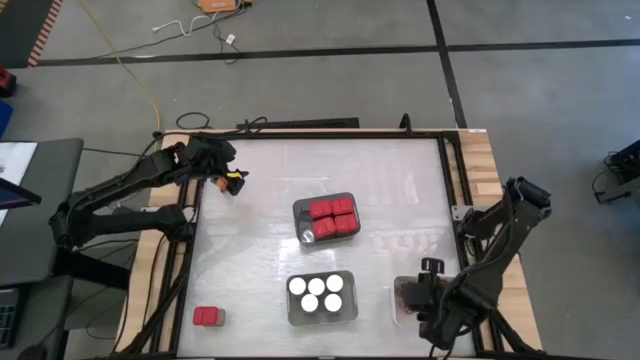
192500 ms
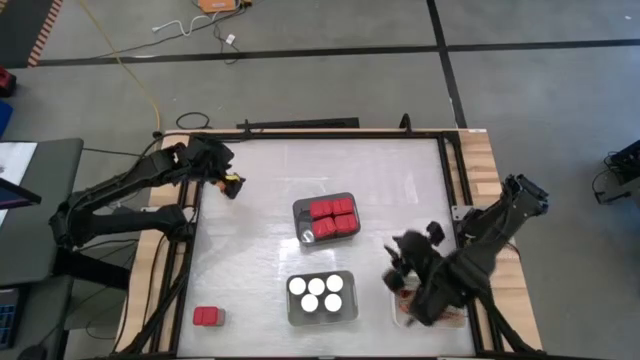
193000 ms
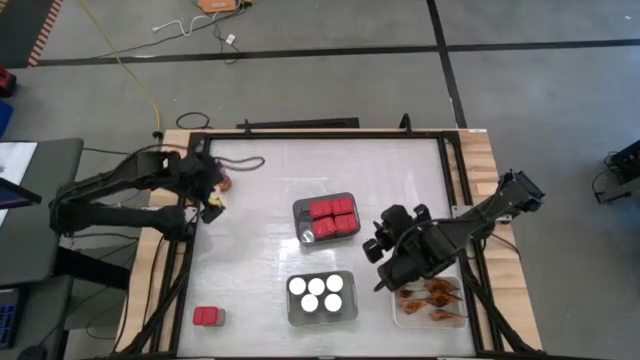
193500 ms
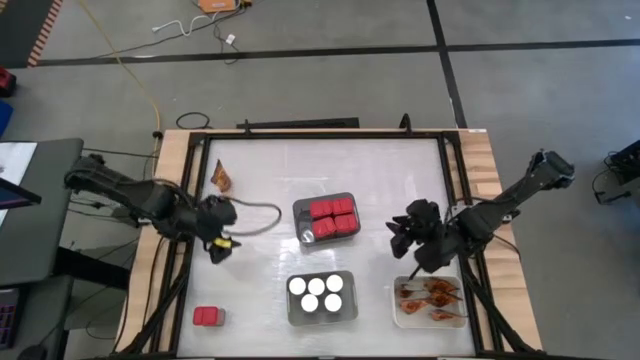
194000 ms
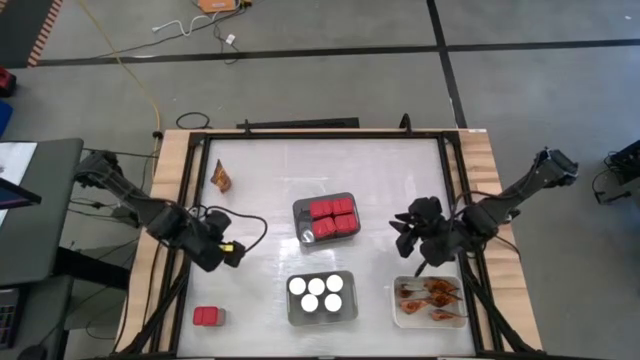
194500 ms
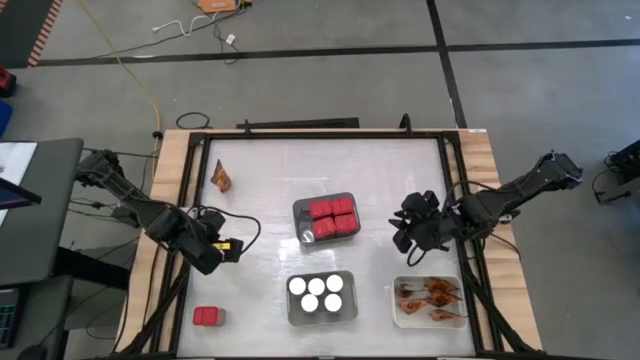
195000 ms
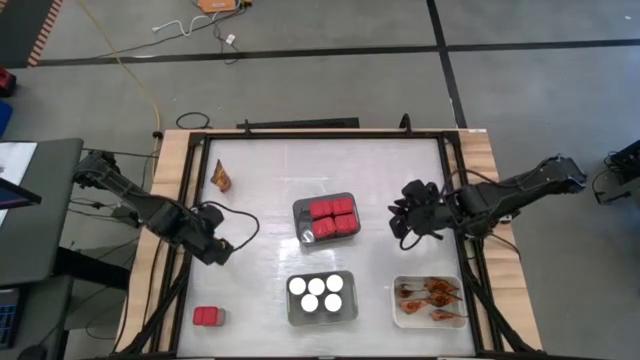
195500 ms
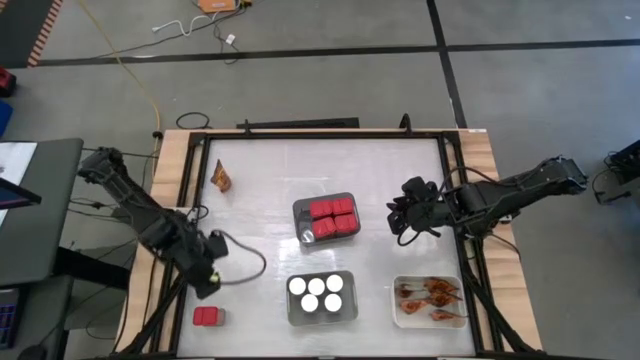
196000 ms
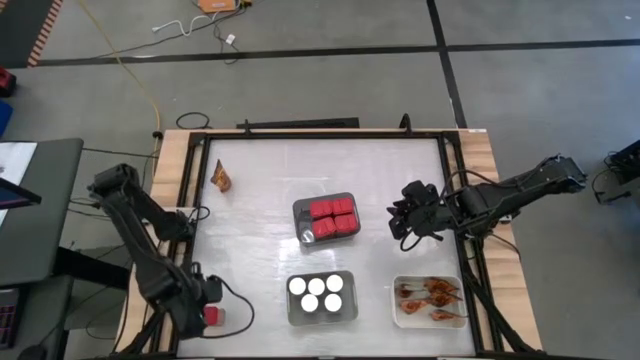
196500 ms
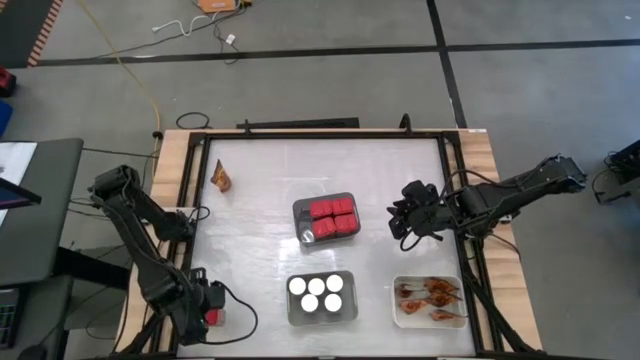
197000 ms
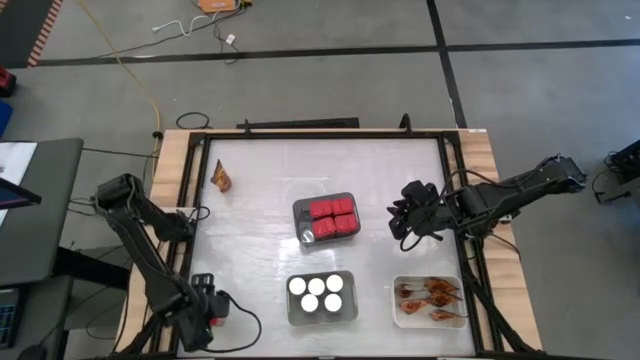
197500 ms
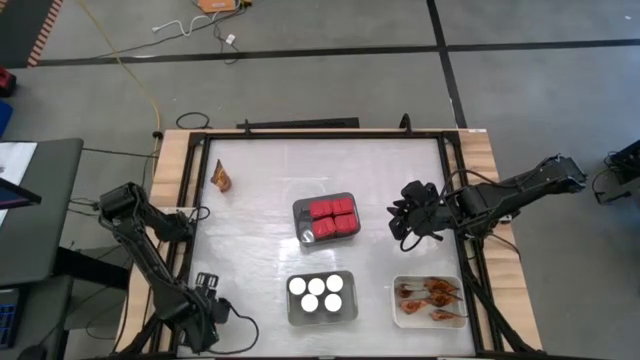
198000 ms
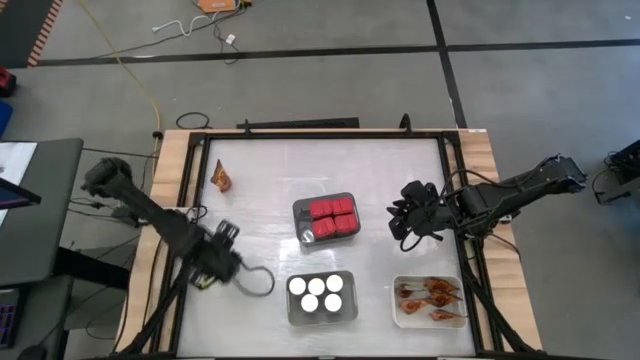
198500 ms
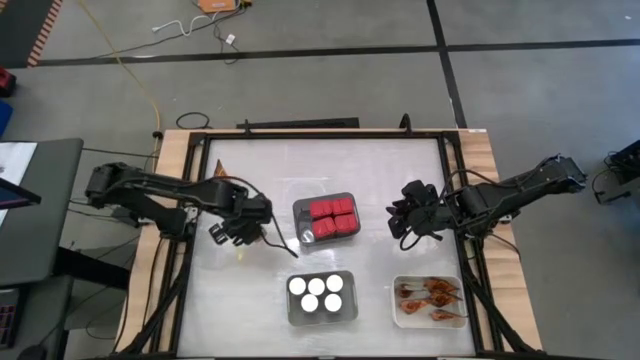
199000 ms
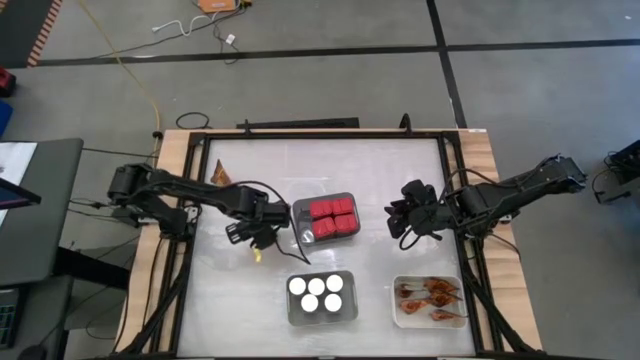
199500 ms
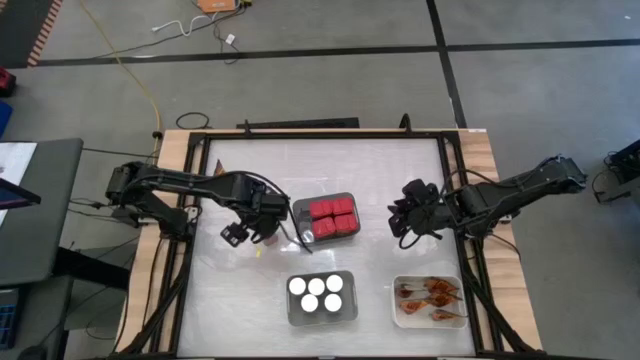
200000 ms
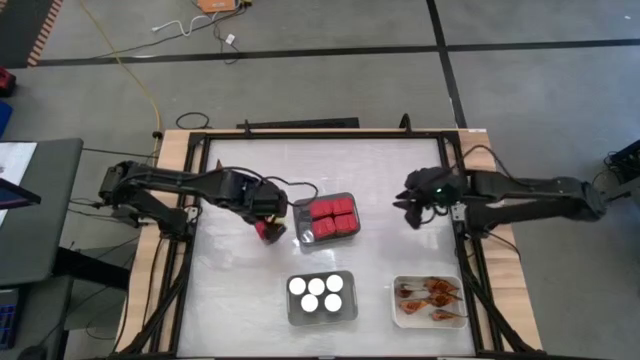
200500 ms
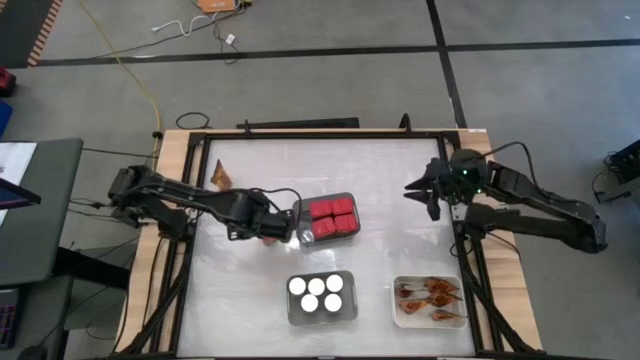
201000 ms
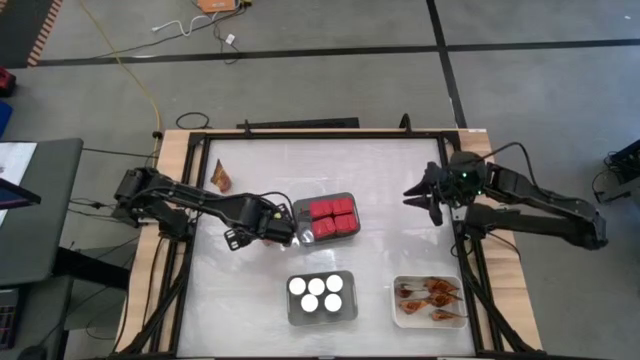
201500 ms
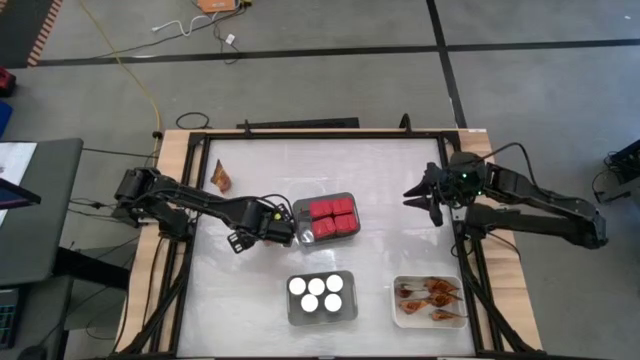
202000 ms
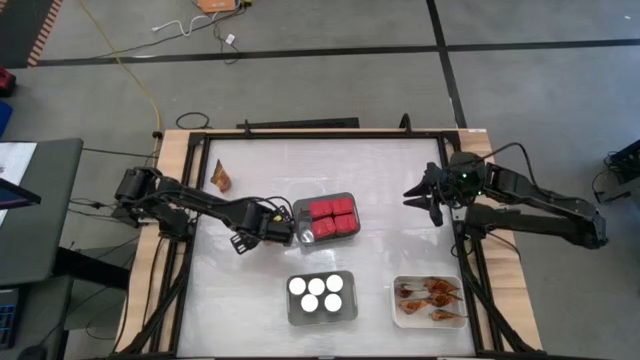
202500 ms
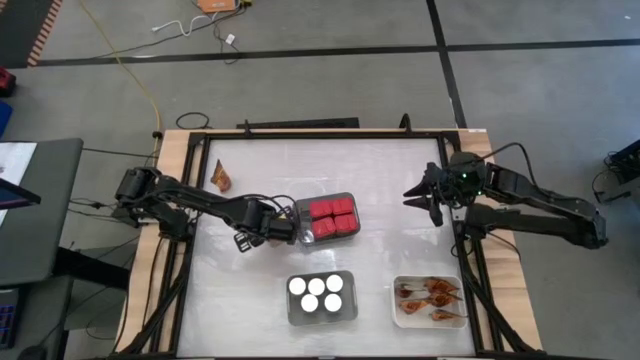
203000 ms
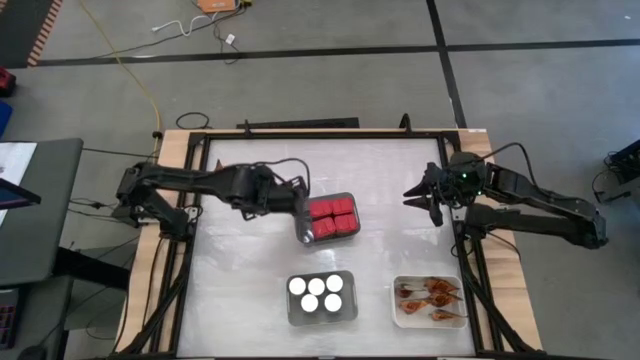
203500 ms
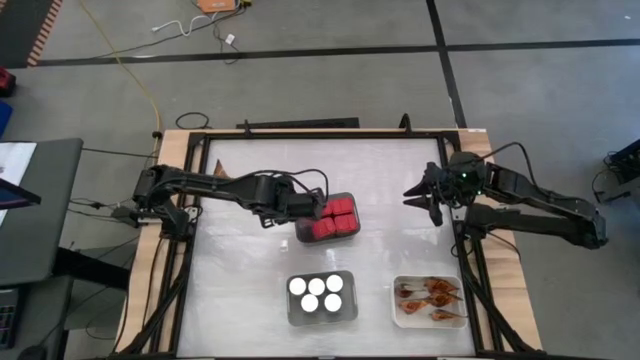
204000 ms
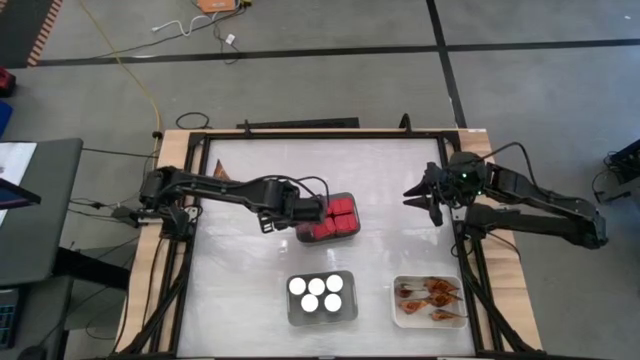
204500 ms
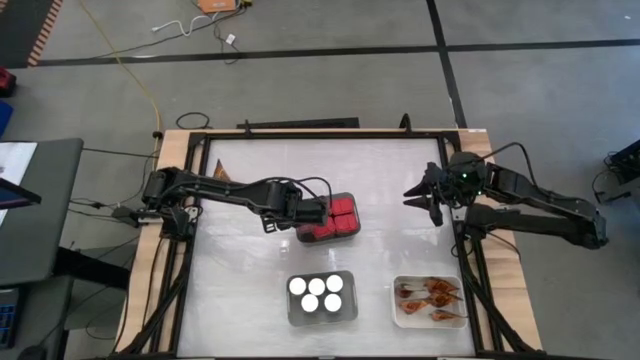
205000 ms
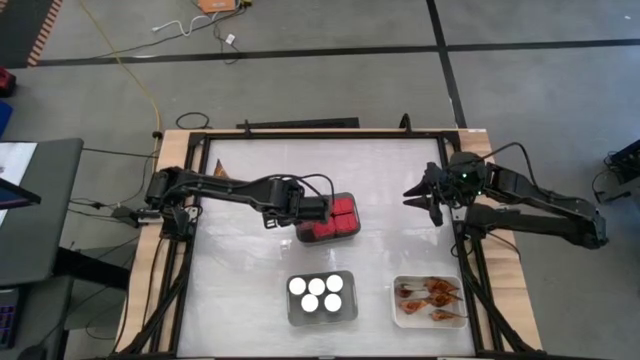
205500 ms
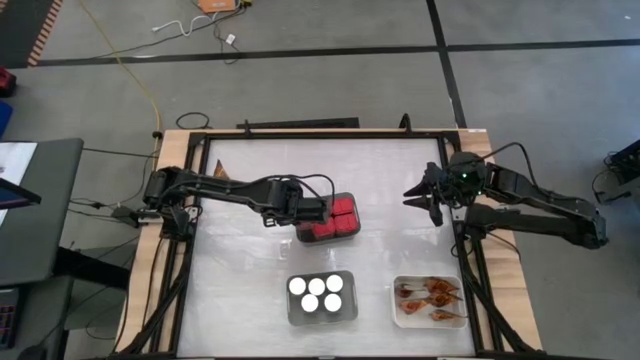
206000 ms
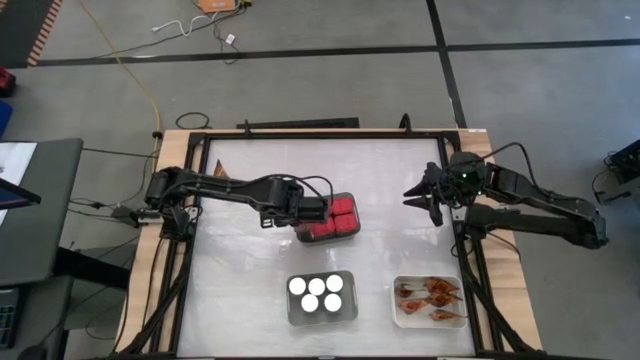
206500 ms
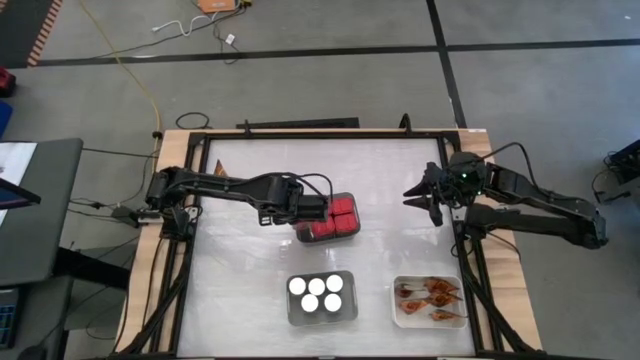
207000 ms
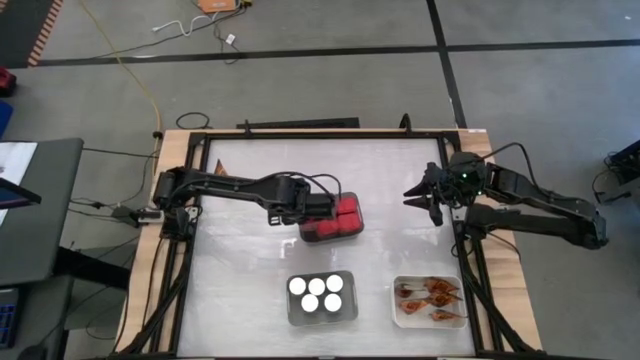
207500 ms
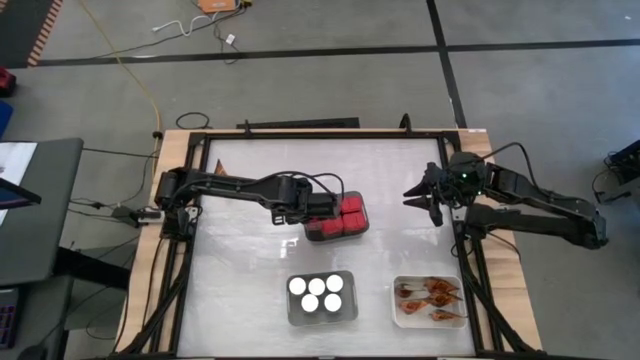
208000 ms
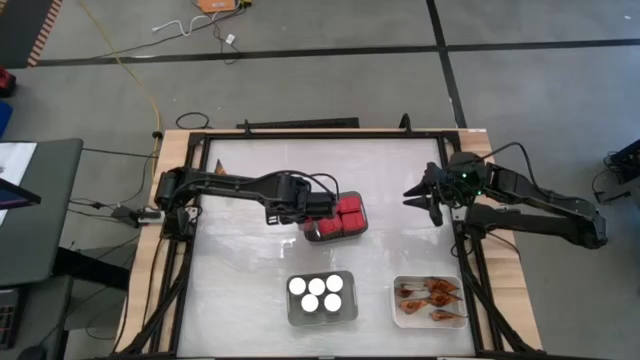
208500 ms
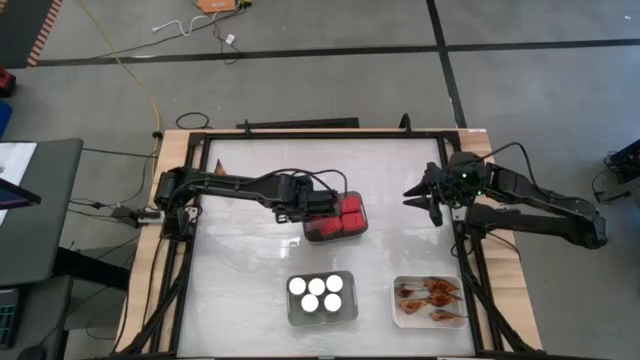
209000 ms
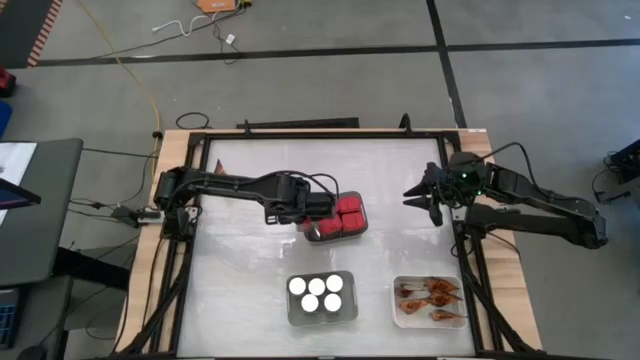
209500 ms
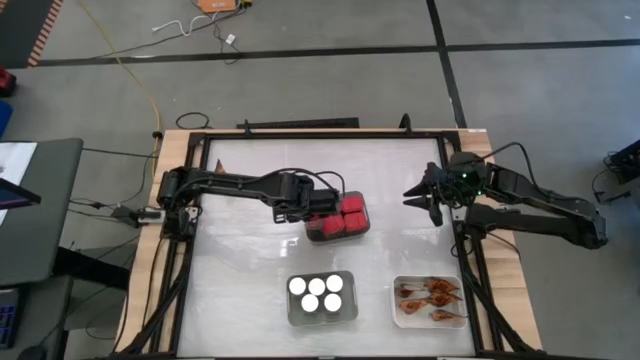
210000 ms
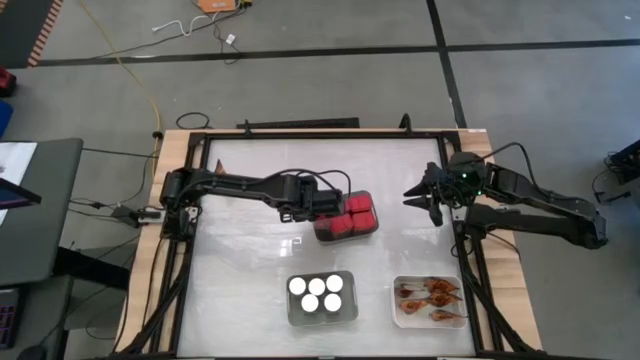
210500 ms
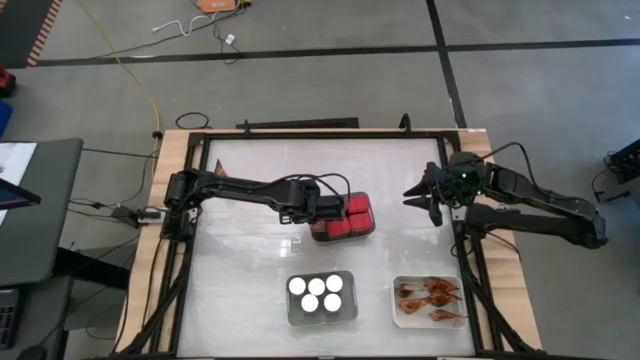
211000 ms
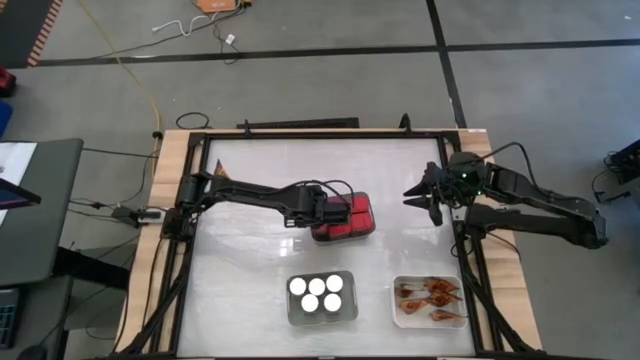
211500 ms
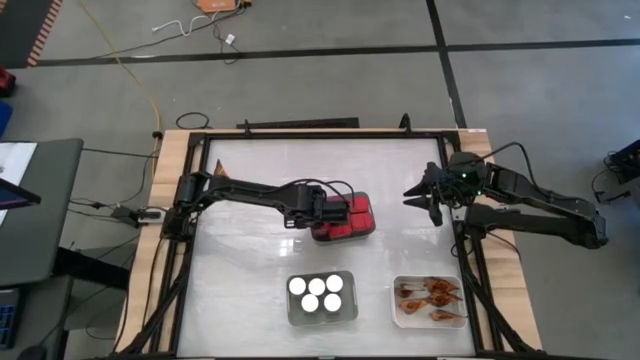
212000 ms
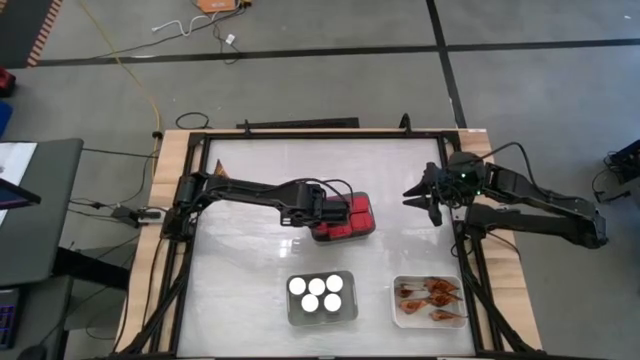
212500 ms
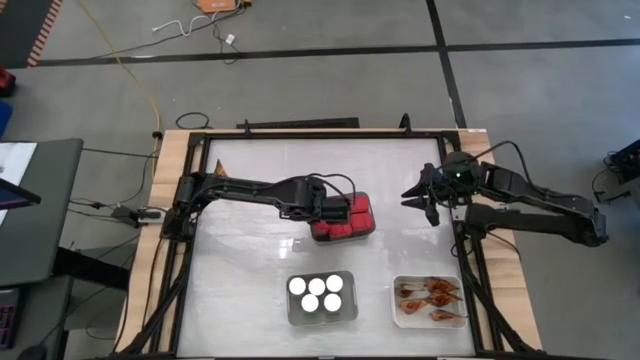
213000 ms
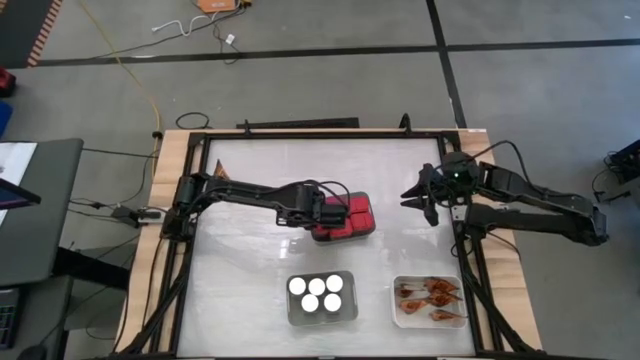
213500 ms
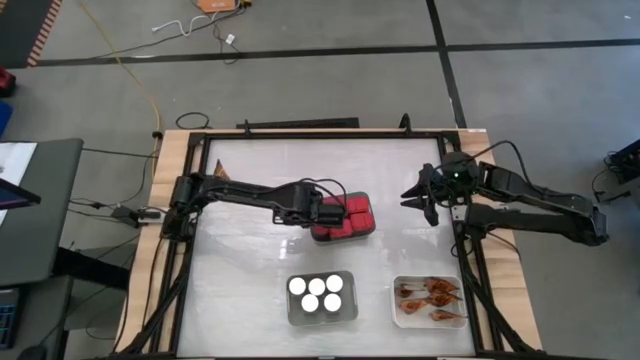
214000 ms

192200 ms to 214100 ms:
Task: Sort spices by type
Put the red seasoning can into the black bin
